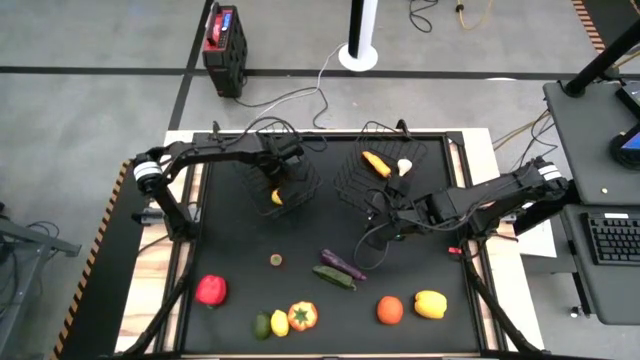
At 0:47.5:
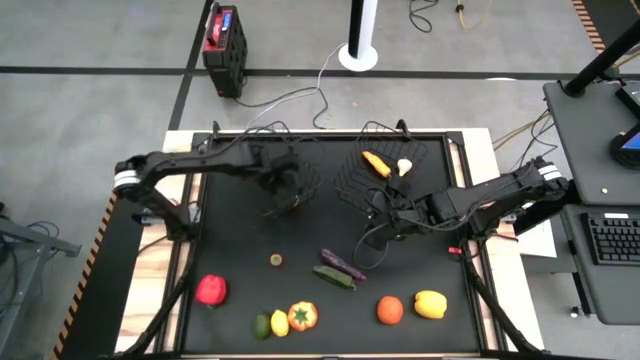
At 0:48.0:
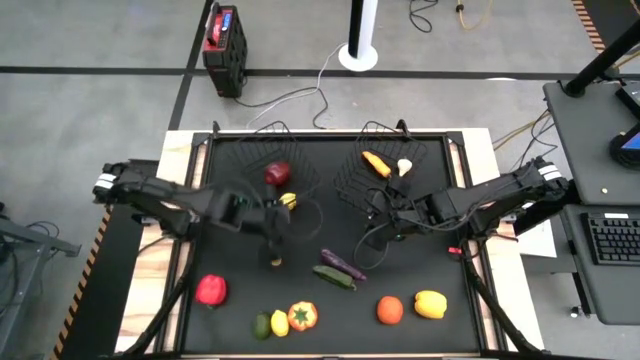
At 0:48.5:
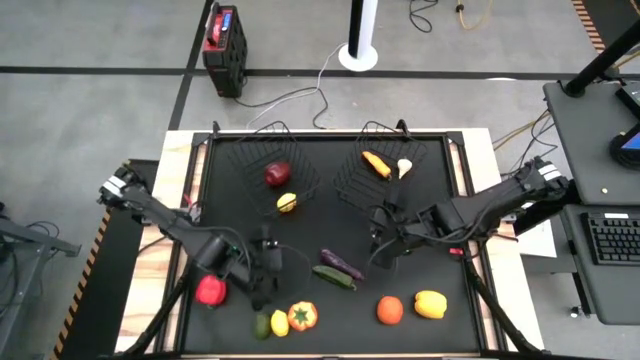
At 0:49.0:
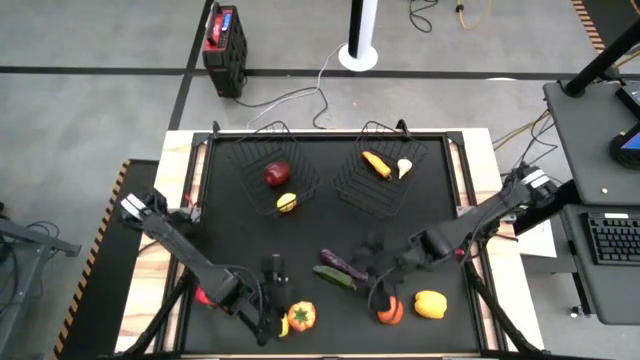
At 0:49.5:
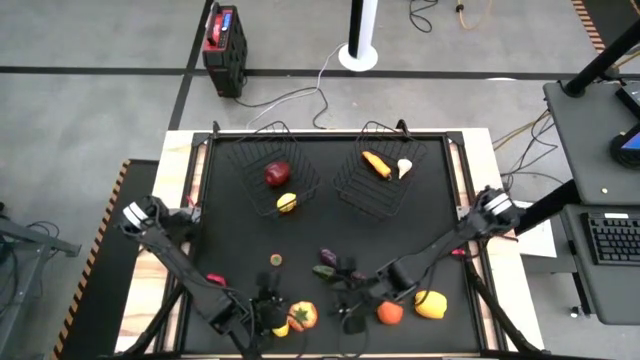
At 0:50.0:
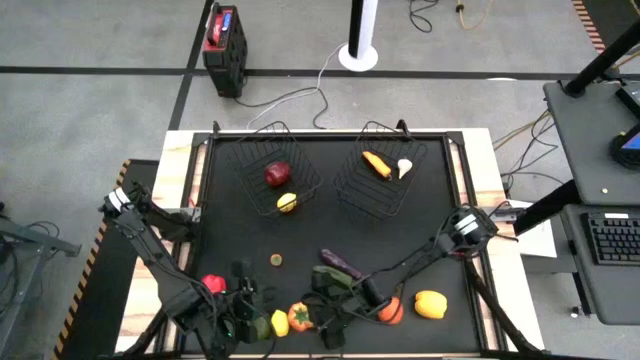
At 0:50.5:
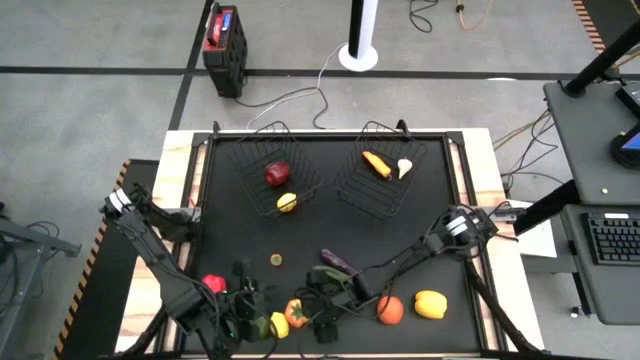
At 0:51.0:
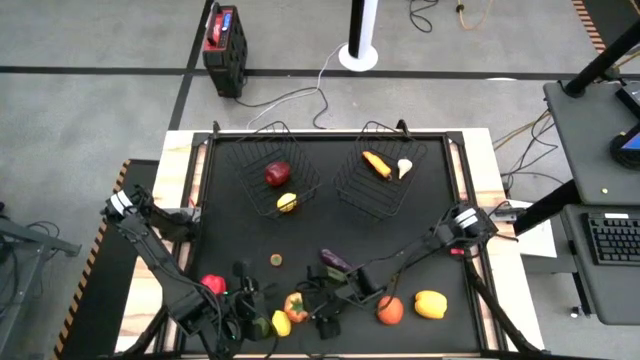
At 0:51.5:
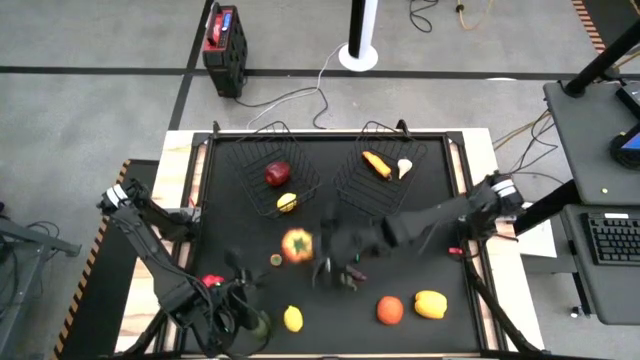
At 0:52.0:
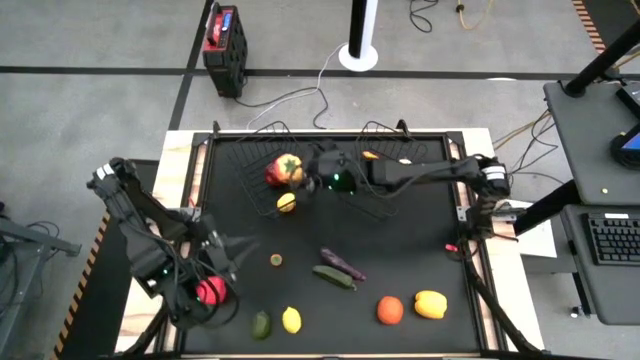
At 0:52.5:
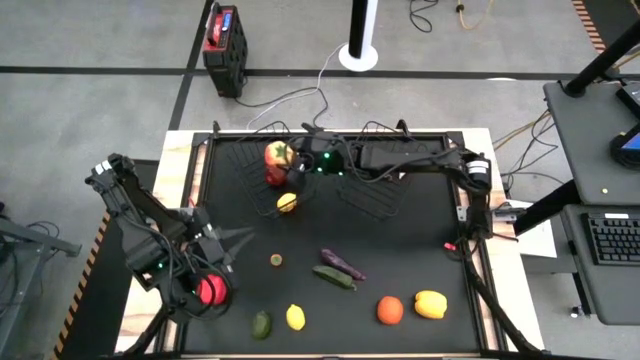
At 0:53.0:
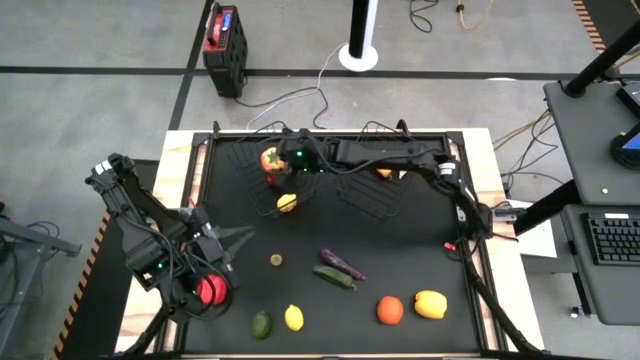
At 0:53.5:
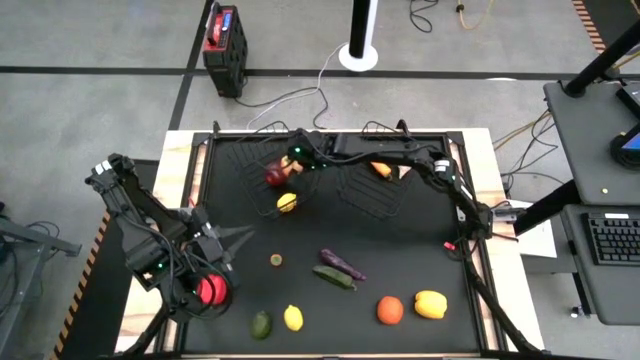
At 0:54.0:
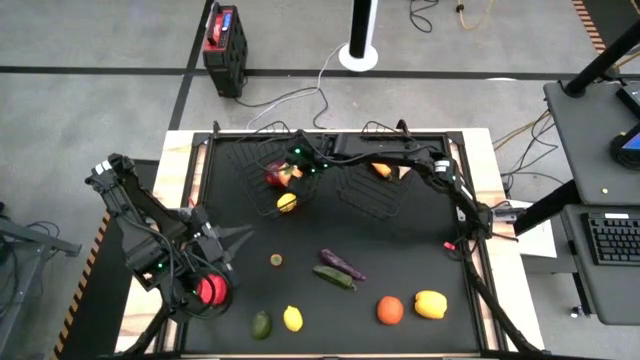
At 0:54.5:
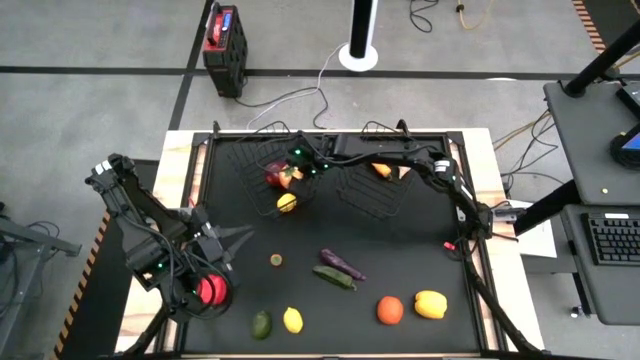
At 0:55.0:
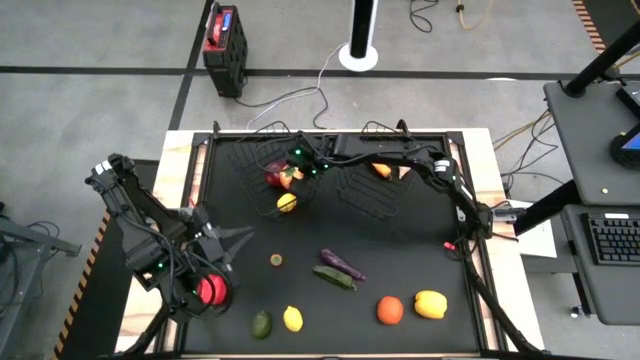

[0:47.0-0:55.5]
Task: Sort produce into baskets
Put the orange tomato into the left black wire basket

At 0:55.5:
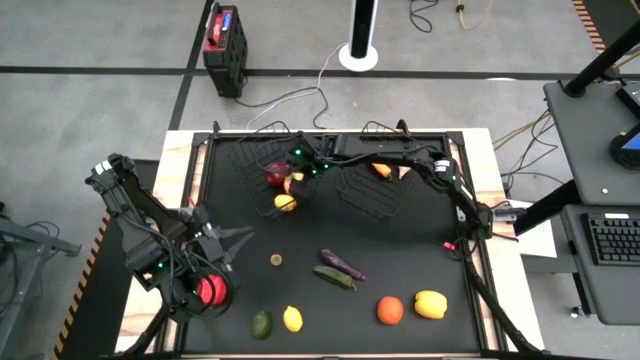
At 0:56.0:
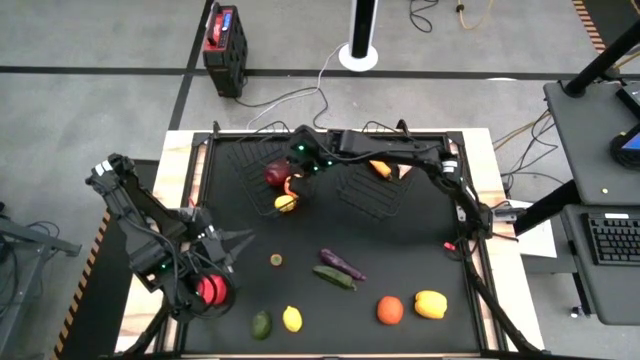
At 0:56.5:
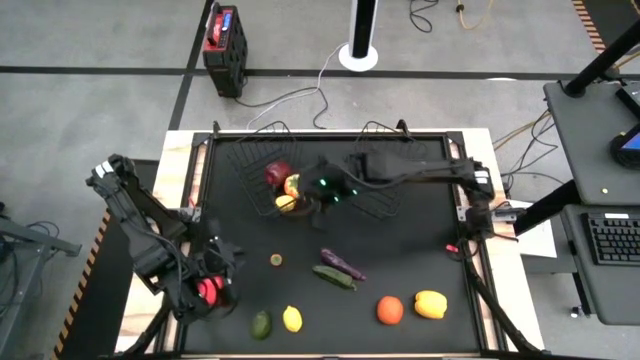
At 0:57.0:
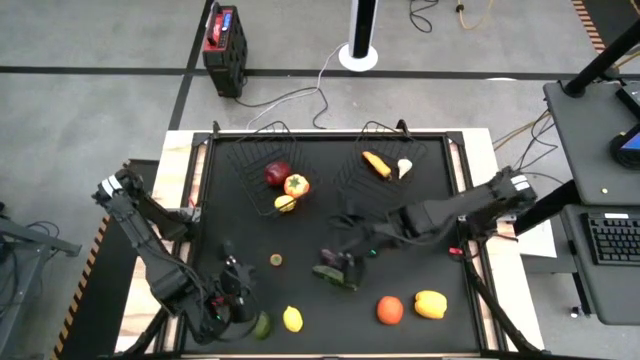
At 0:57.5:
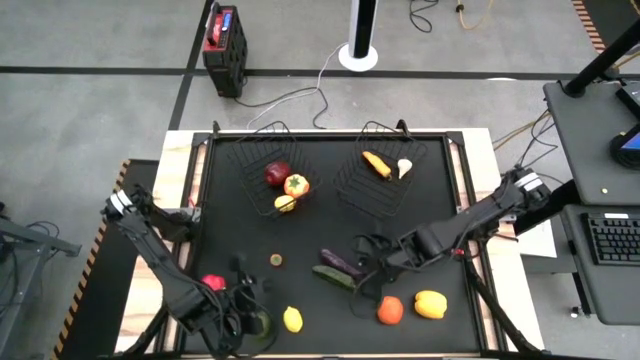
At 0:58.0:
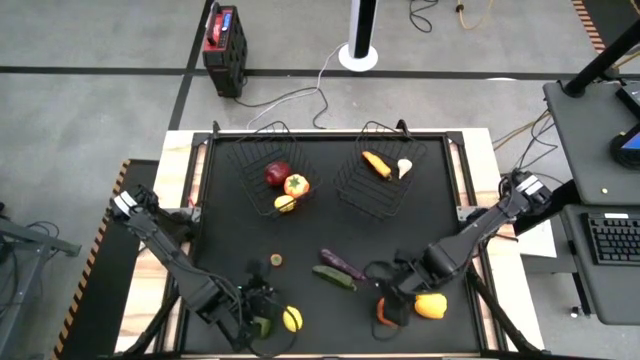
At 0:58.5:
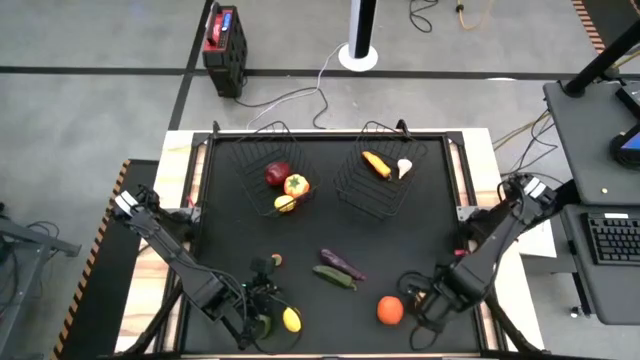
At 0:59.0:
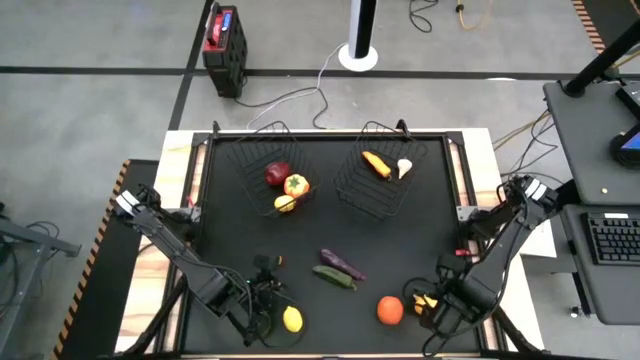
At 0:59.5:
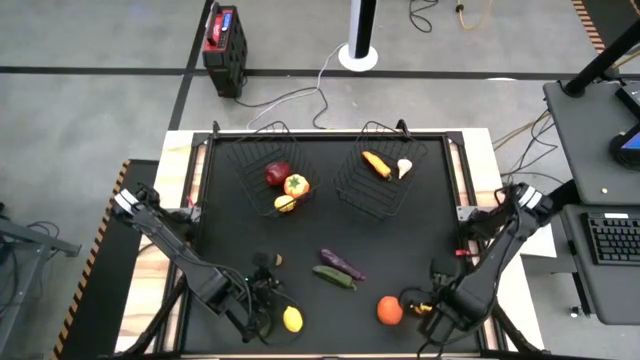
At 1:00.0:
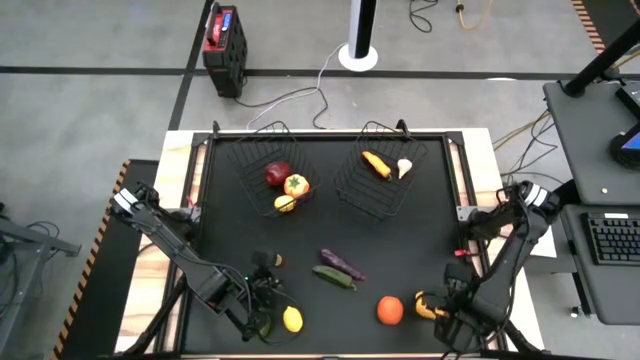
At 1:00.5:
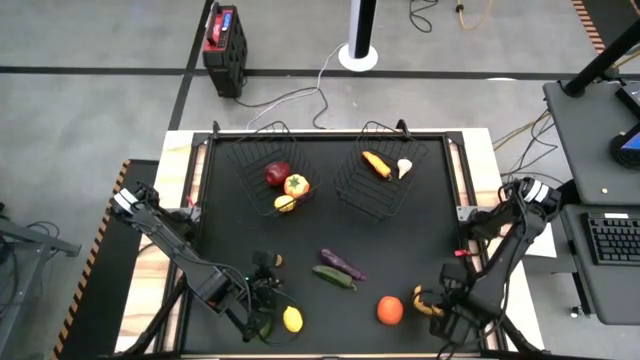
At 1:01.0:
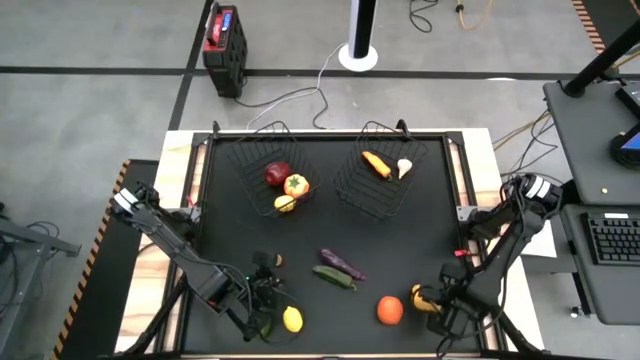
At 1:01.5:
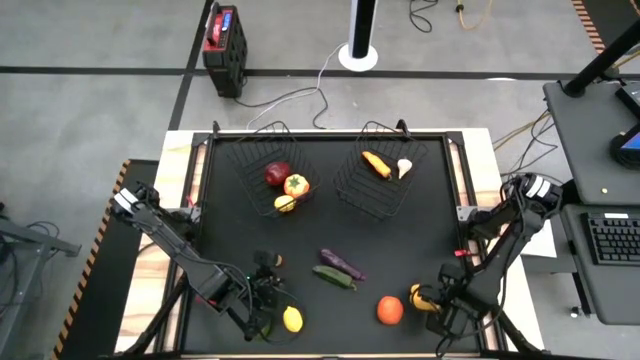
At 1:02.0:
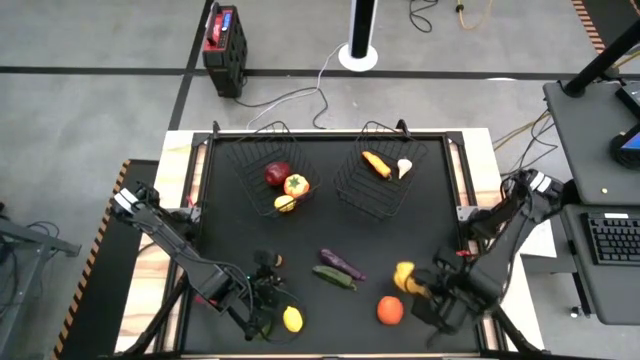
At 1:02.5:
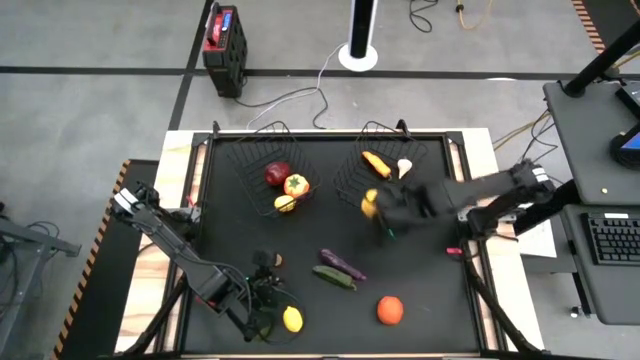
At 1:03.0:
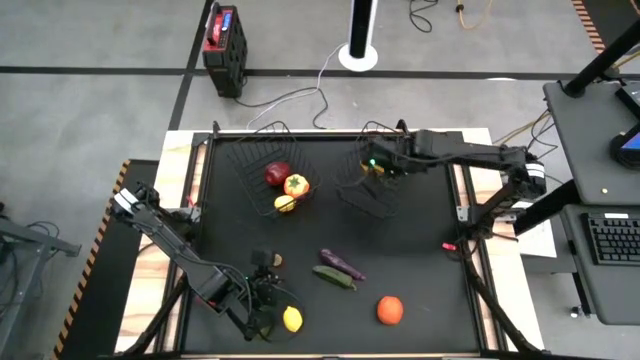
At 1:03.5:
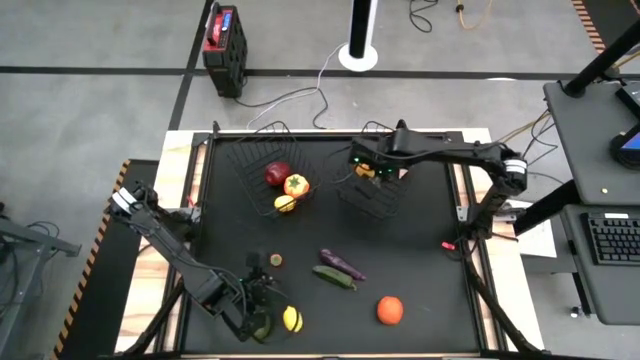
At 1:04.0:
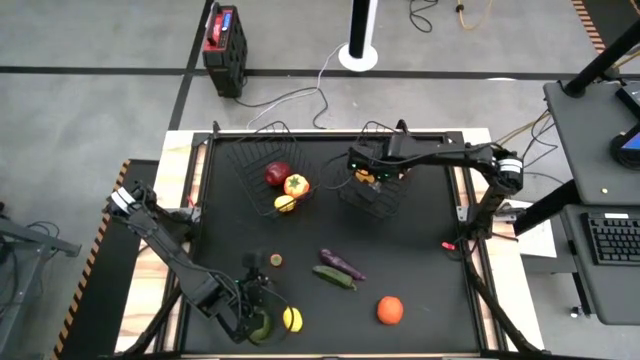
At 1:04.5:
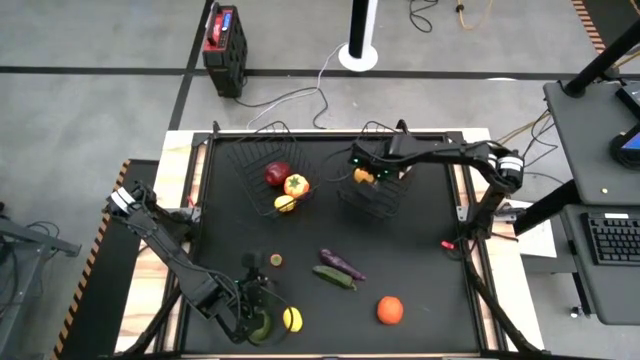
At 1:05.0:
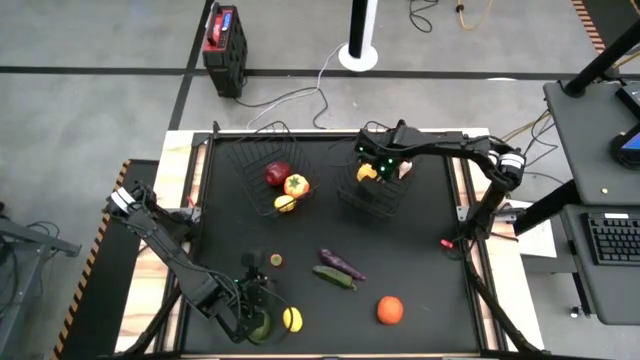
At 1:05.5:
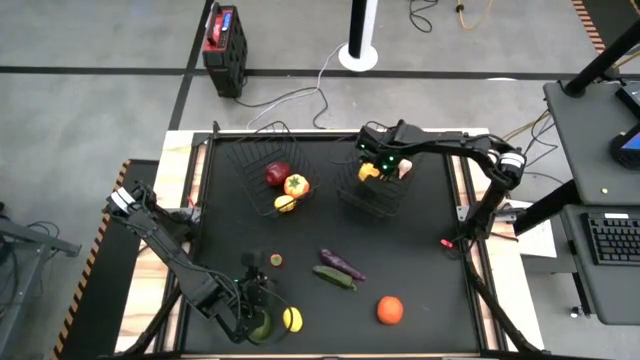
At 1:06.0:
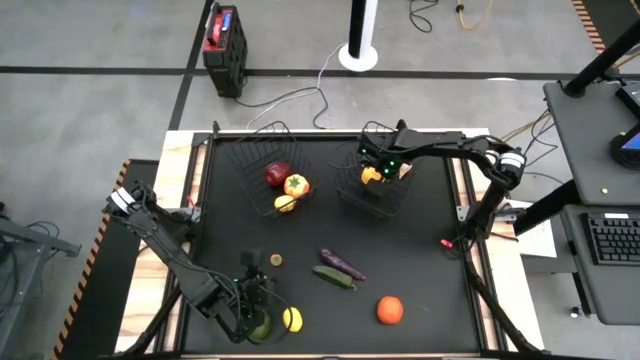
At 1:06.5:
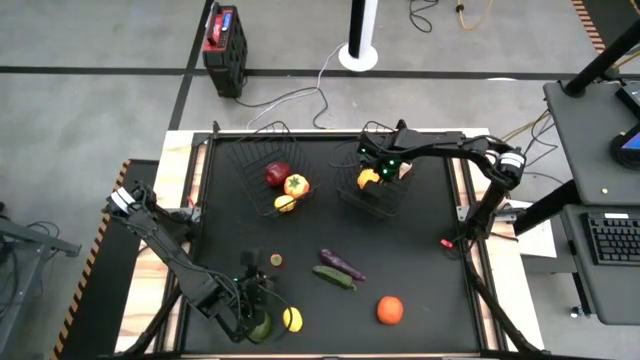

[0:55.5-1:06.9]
Put the yellow bell pepper into the right black wire basket

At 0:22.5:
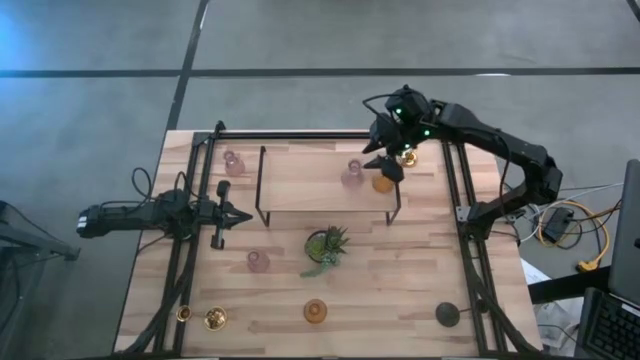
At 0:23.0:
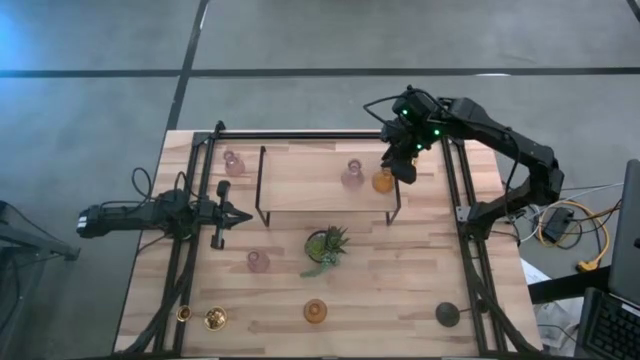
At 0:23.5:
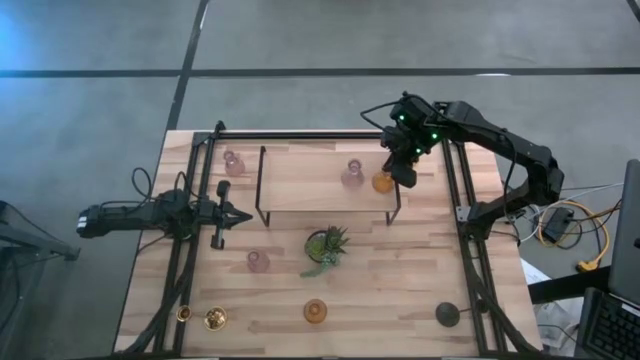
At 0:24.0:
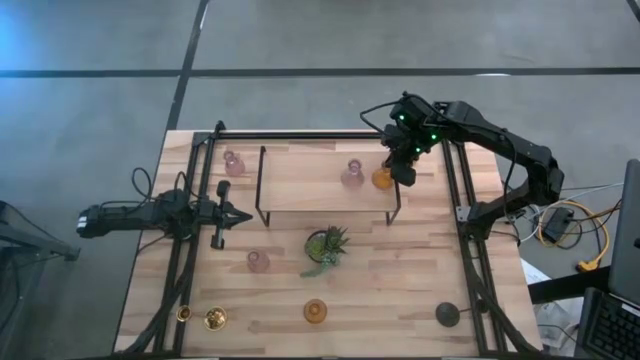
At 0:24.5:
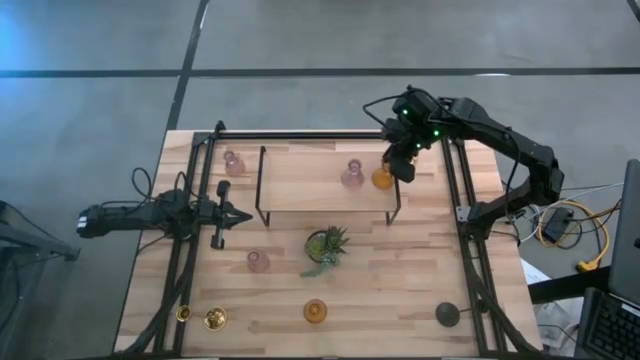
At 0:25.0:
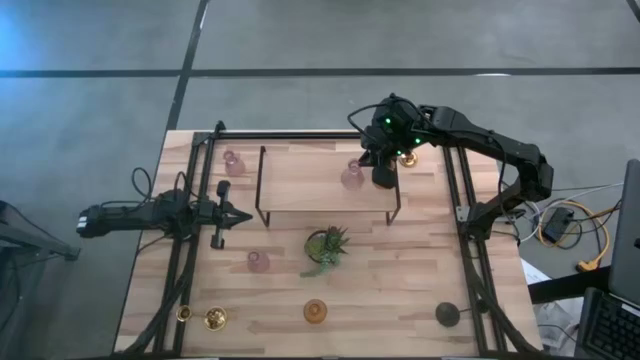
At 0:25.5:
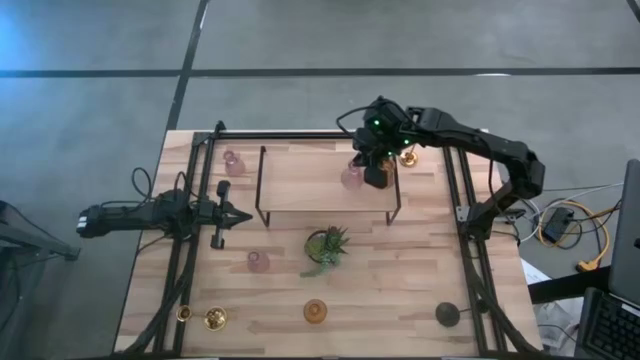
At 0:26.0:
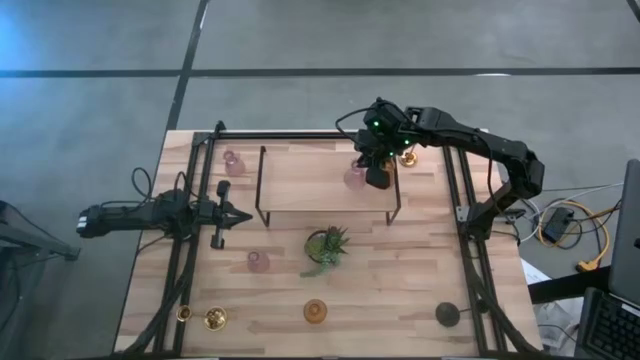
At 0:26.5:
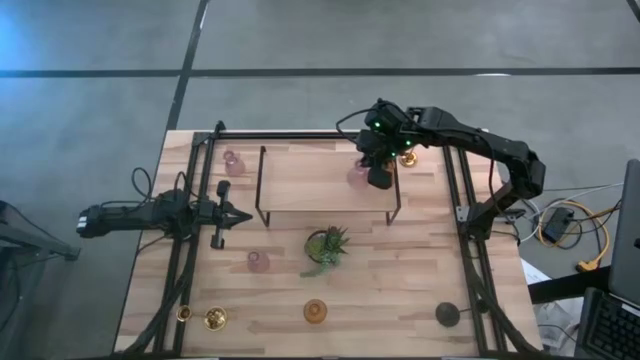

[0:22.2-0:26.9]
Task: Pick & Place candle stick holders
Adjust the glass candle holders on the shelf
